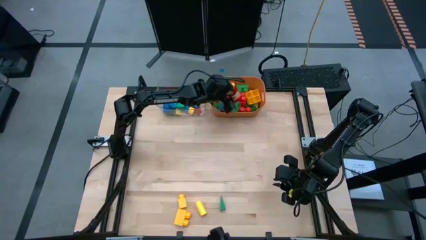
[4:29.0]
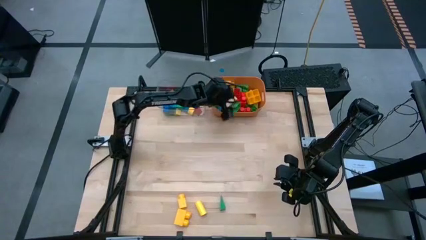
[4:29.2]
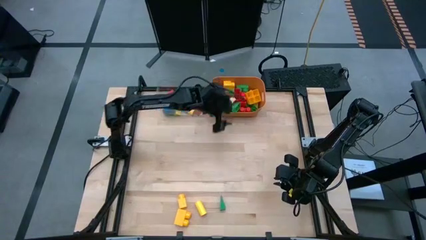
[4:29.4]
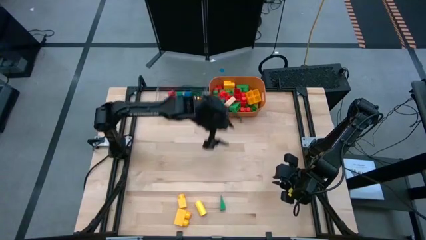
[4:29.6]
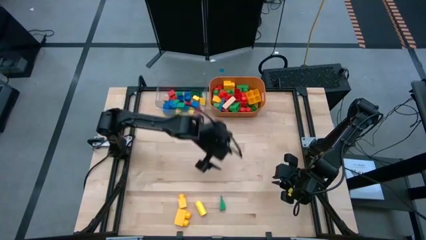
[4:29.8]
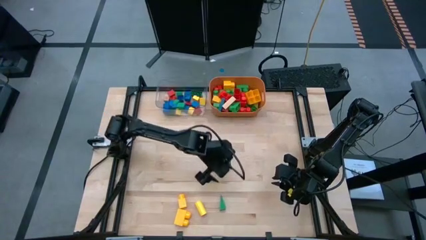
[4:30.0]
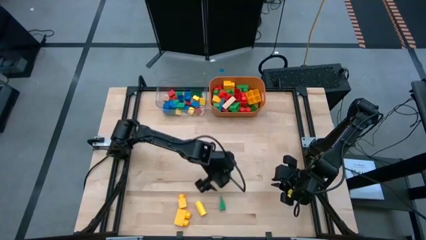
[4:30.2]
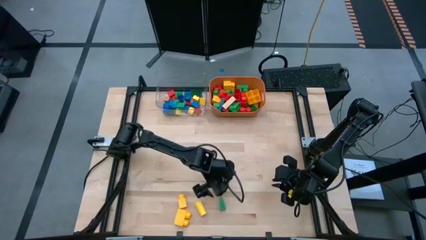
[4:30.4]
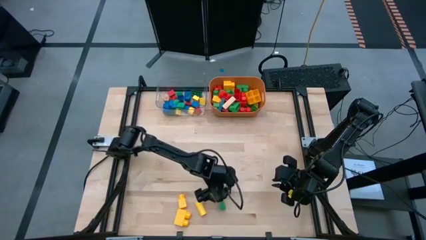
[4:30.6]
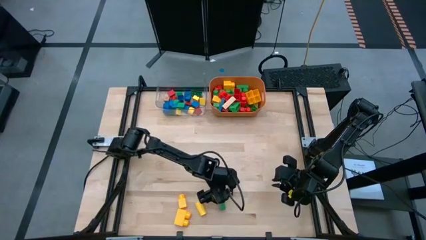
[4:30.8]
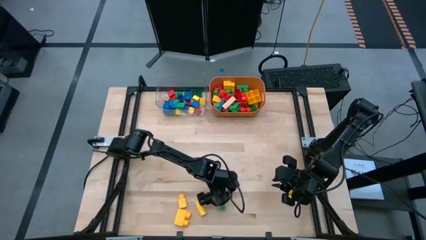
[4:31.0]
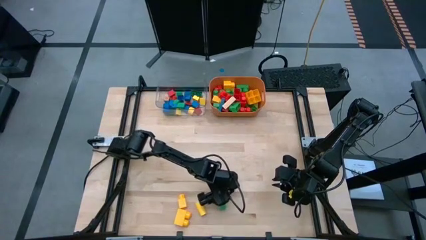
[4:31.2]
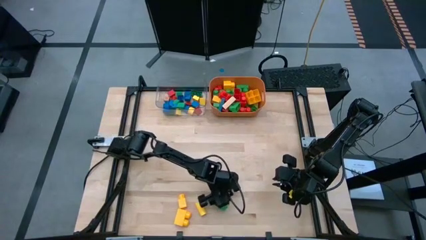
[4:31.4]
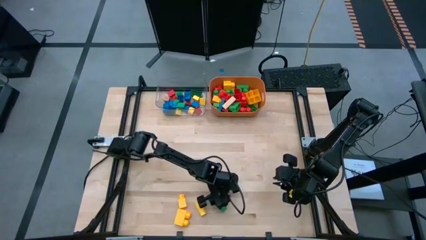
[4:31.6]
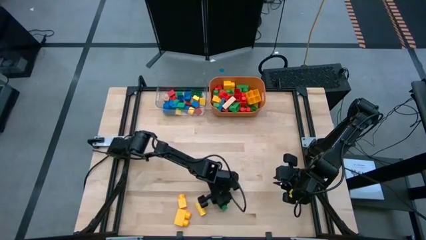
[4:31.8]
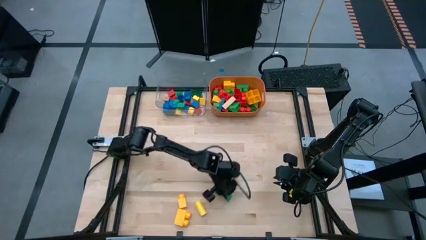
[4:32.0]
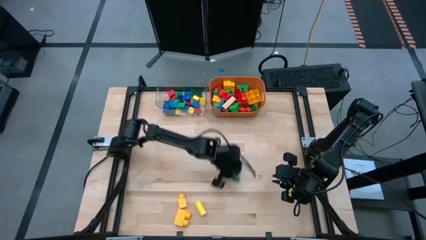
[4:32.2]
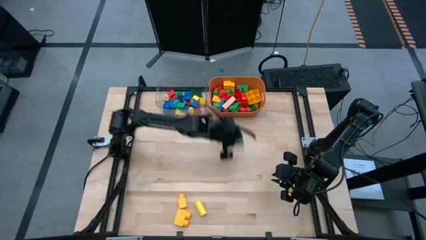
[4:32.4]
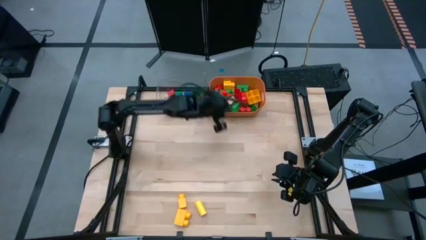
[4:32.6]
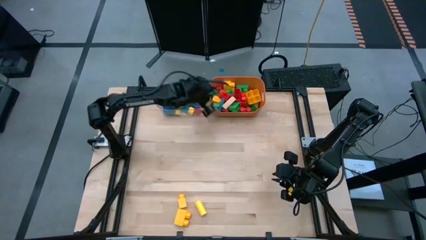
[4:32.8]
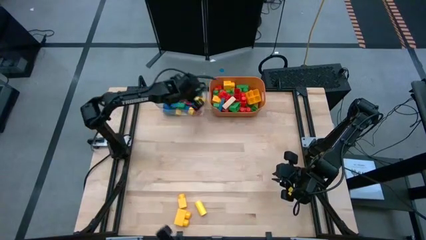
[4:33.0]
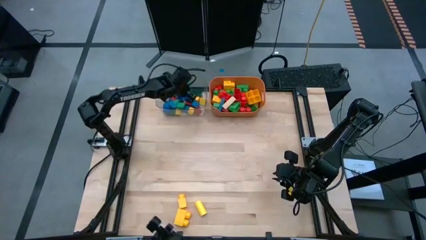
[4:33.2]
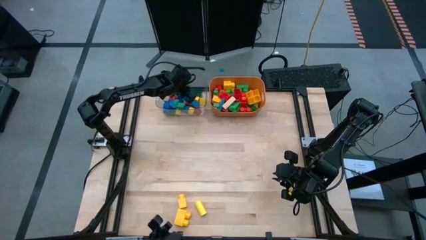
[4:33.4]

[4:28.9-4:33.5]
Task: Sort blocks by size
Put the small green block into the transp[arent bin

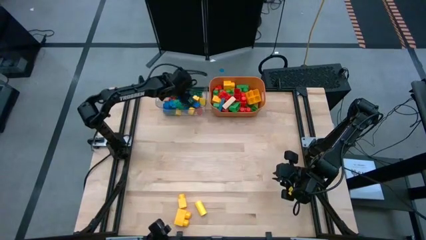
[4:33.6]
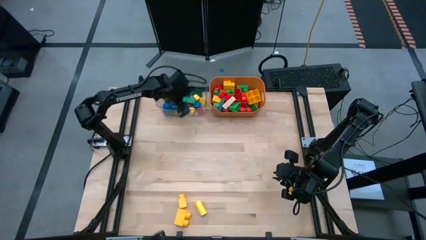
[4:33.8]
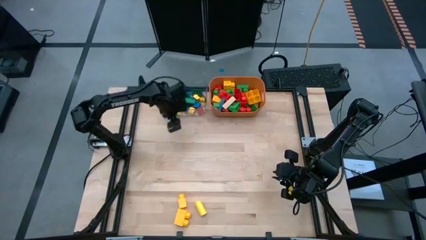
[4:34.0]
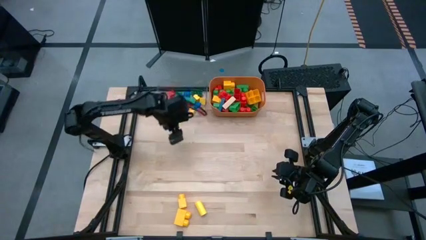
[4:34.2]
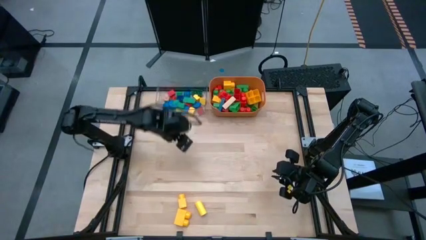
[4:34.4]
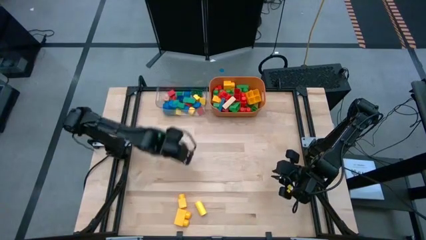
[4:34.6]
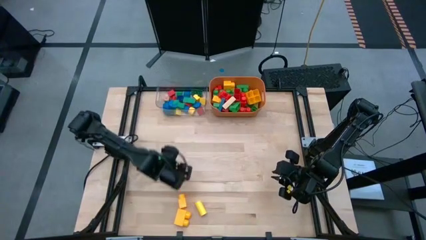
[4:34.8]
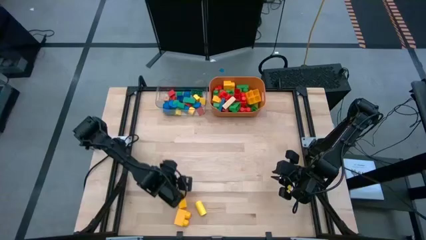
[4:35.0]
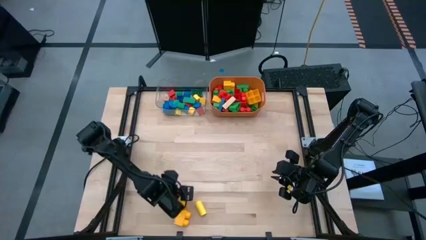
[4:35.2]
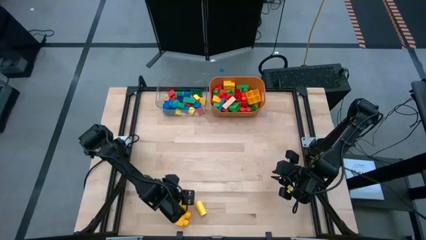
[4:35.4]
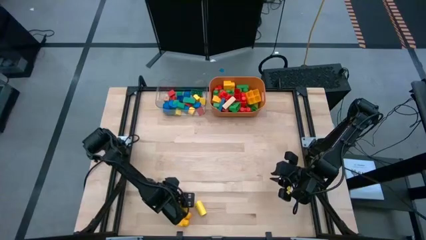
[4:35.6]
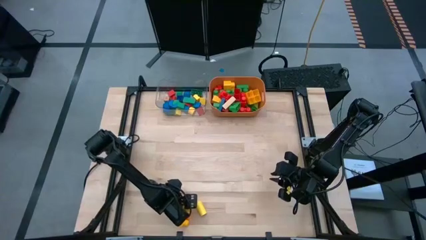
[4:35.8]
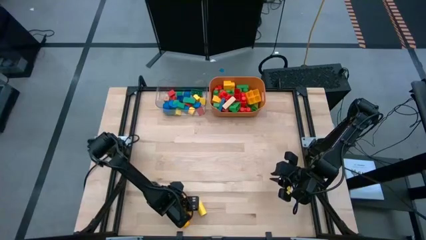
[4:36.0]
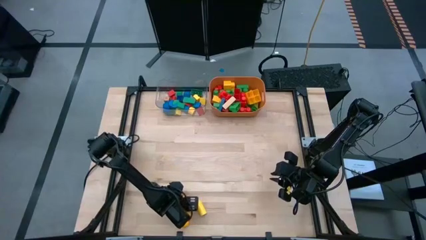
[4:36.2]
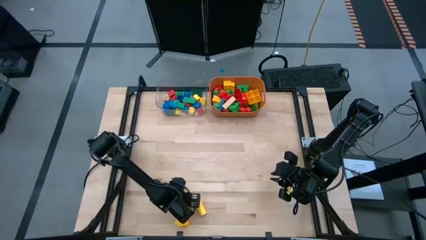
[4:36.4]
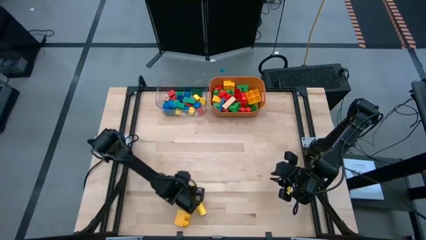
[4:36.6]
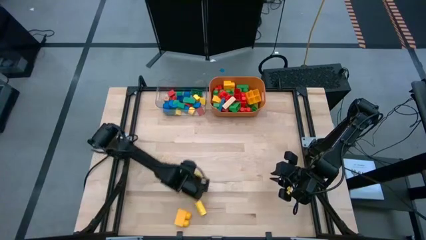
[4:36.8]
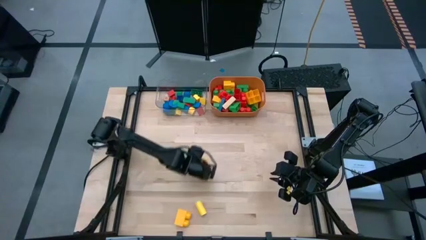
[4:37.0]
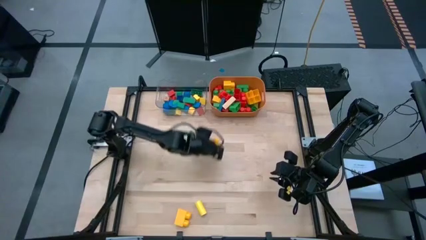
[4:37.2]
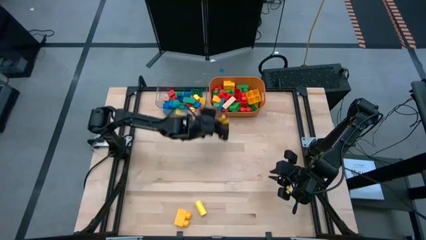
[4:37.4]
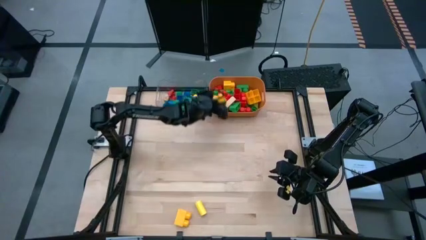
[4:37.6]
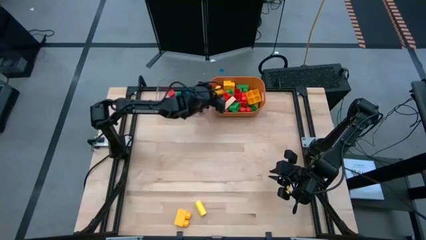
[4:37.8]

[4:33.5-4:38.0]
Put the big yellow game piece into the orange bin

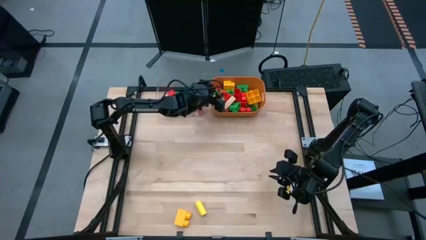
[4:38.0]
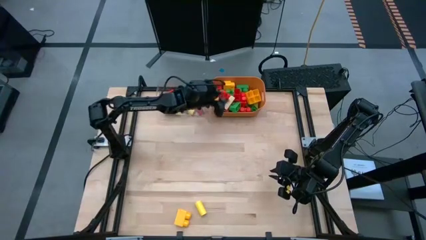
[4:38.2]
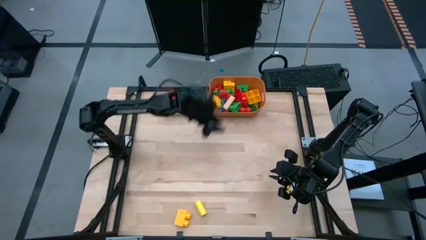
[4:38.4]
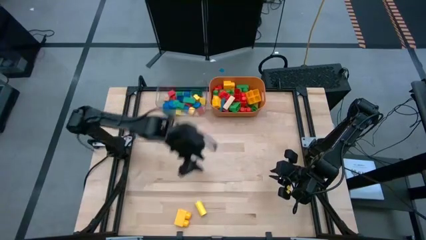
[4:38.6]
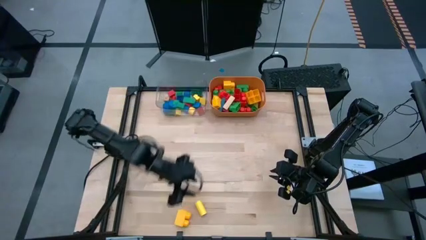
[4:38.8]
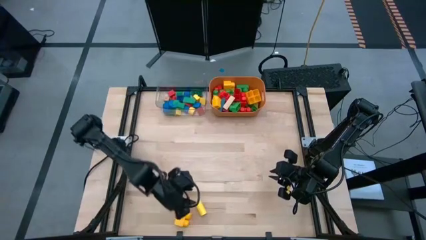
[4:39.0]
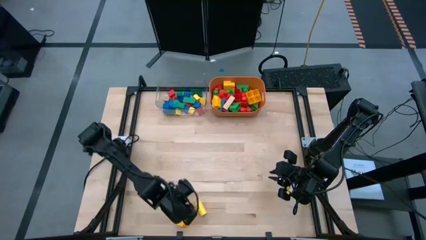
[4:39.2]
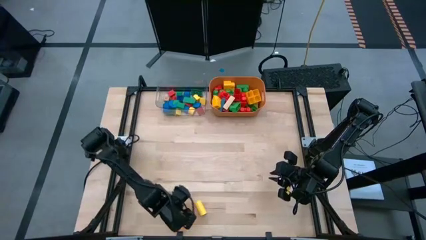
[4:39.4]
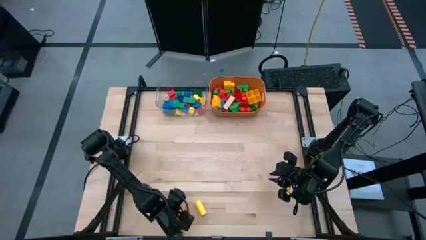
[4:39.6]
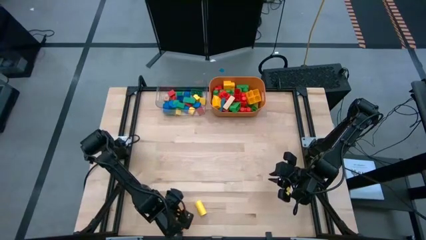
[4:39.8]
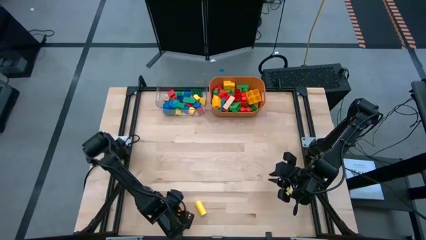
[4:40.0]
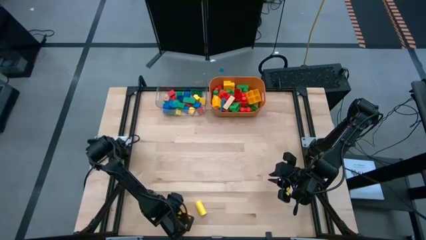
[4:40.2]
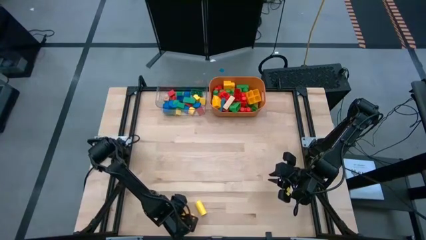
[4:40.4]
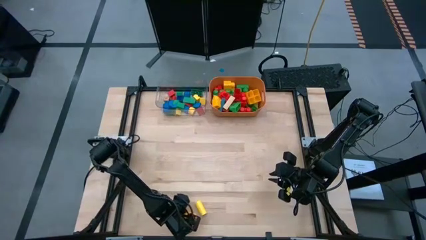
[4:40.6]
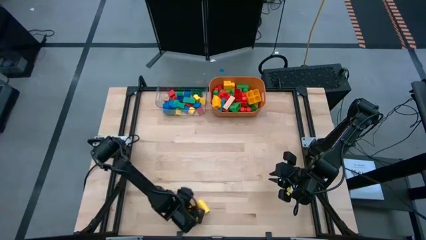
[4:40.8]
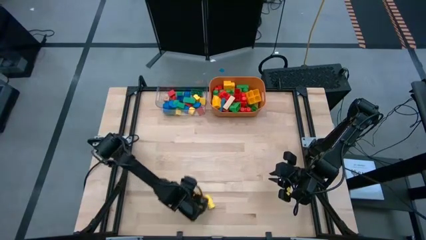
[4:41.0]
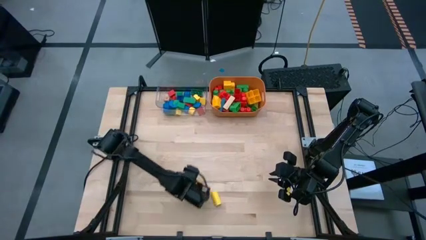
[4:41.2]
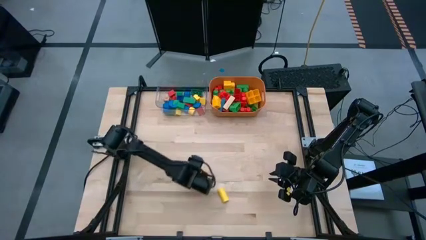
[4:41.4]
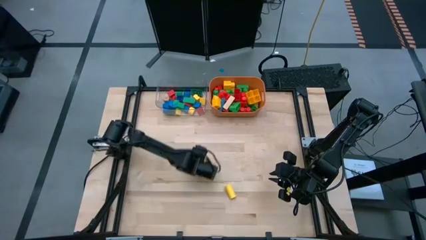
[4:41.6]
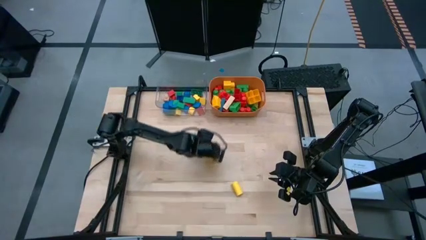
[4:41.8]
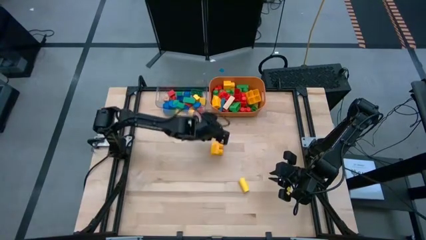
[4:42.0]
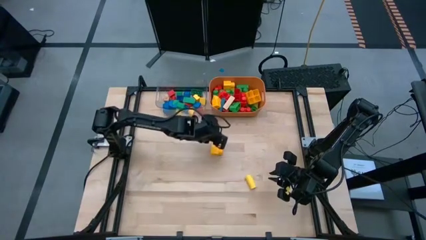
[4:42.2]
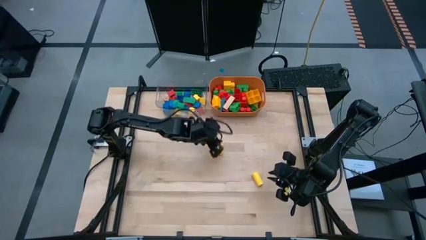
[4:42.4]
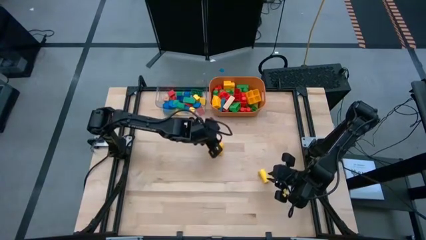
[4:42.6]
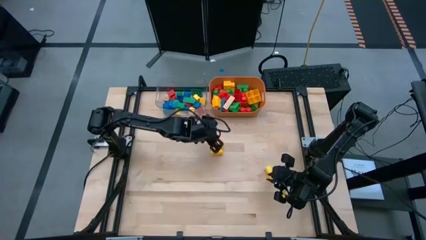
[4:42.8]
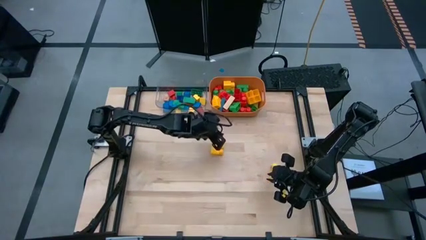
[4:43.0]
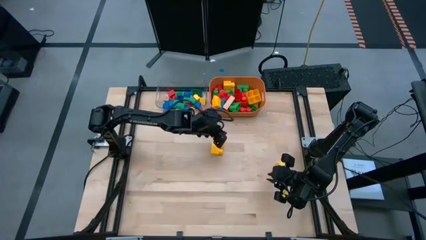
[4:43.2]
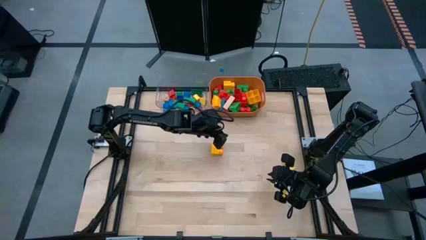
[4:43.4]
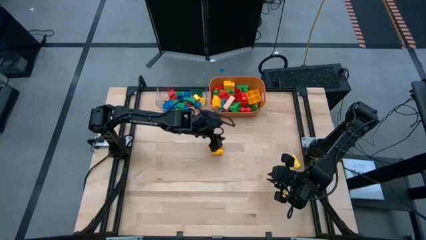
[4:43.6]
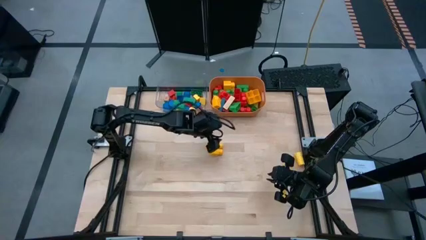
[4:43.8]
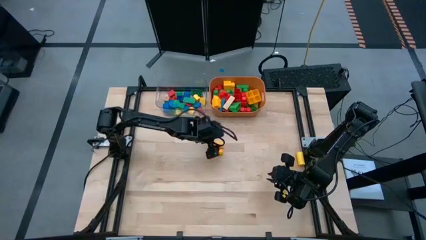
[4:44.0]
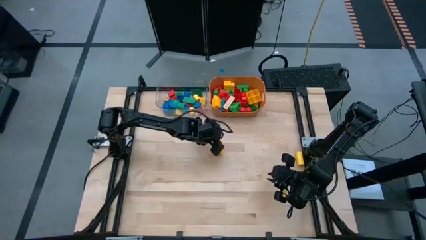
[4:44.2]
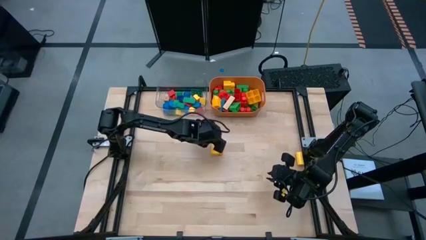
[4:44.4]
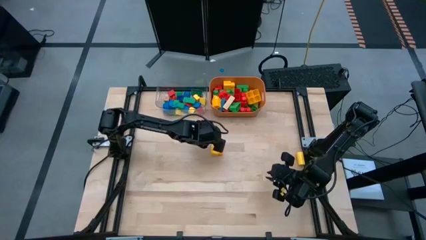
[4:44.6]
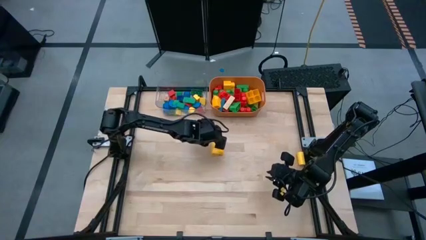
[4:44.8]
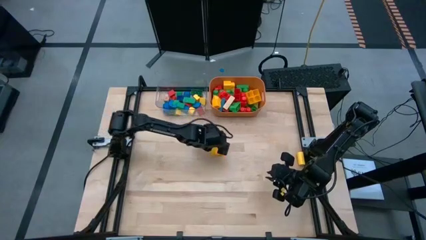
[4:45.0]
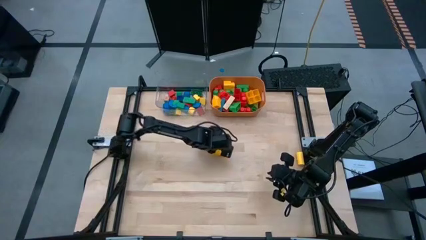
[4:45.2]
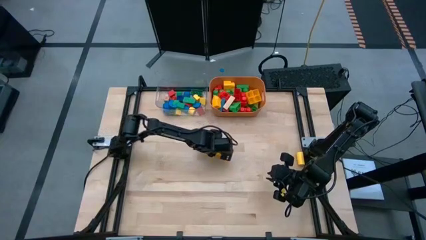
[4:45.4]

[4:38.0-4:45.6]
Put the big yellow game piece into the orange bin
